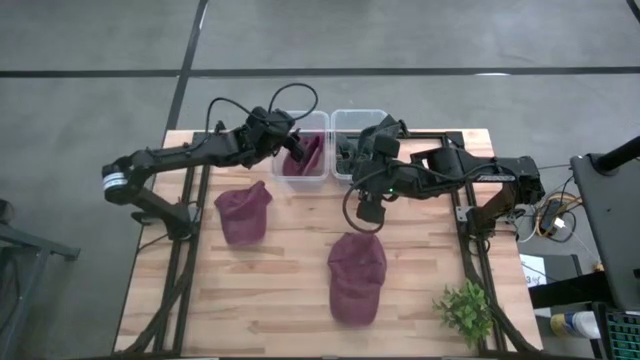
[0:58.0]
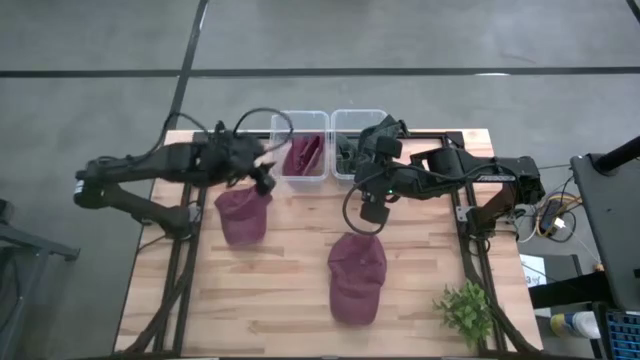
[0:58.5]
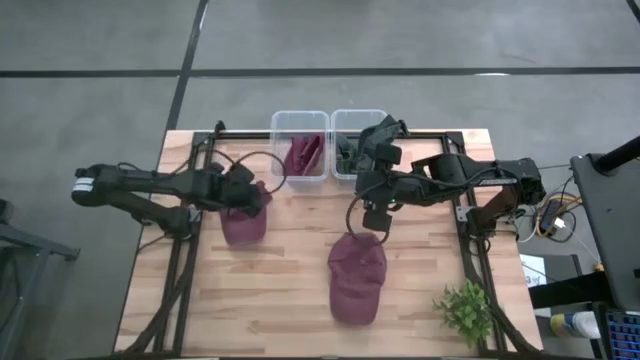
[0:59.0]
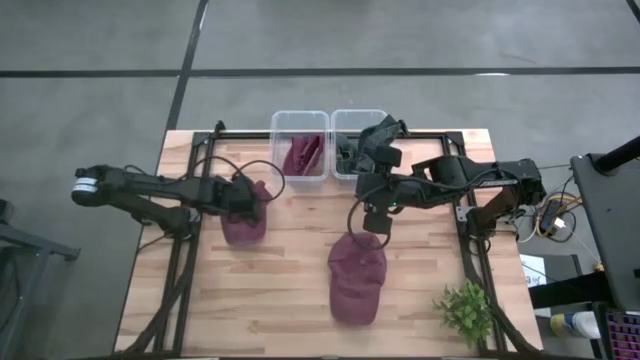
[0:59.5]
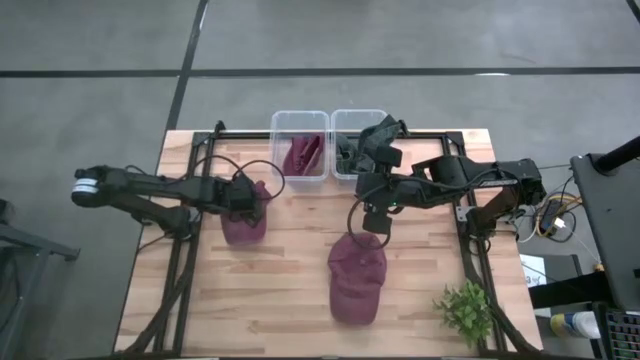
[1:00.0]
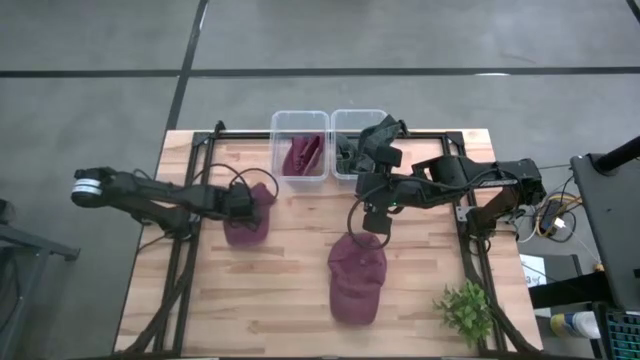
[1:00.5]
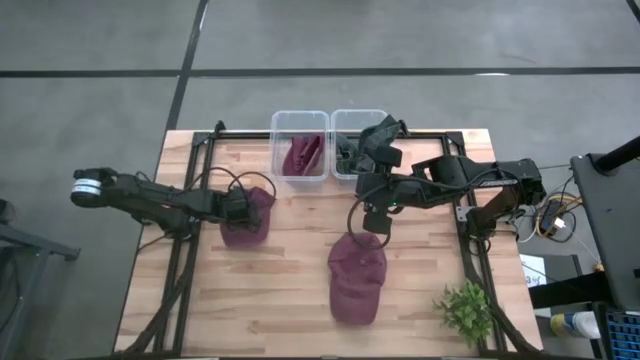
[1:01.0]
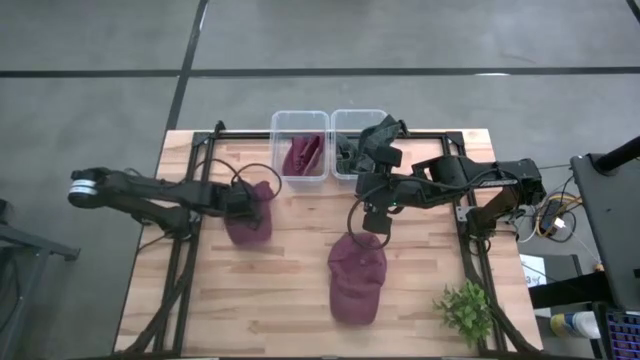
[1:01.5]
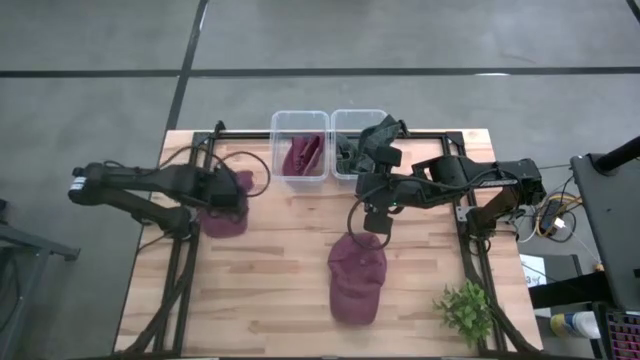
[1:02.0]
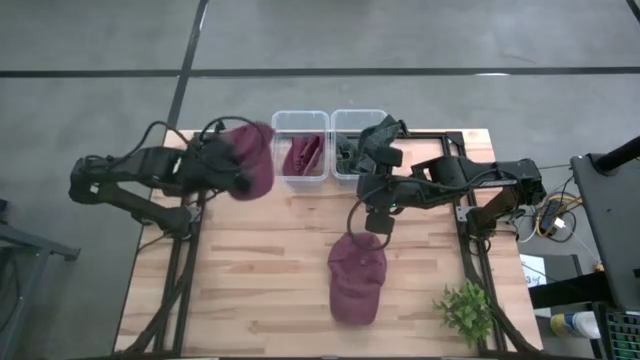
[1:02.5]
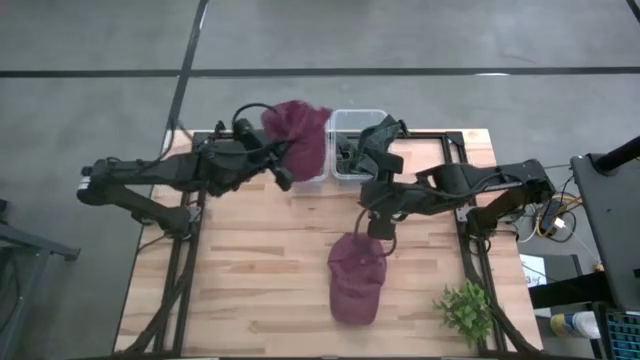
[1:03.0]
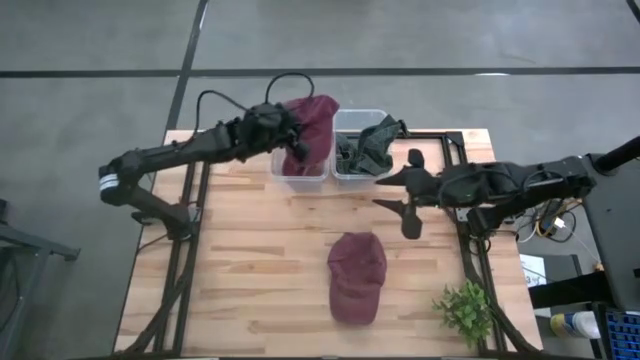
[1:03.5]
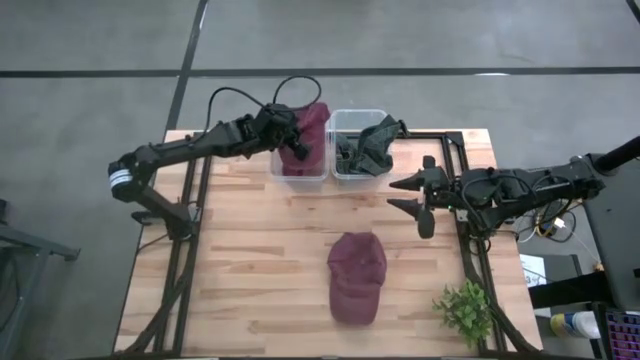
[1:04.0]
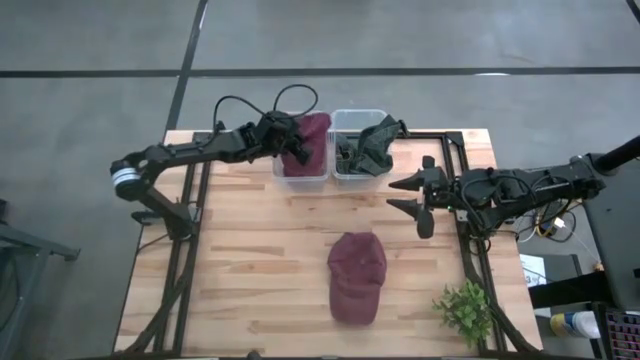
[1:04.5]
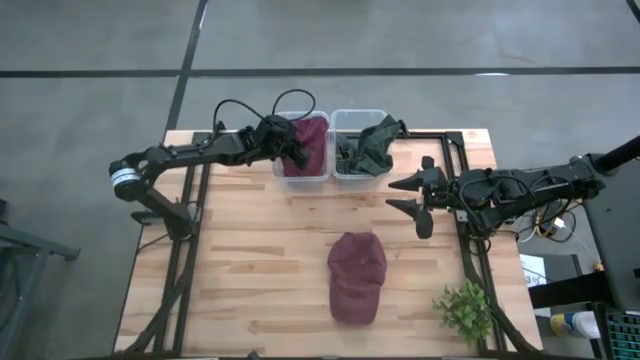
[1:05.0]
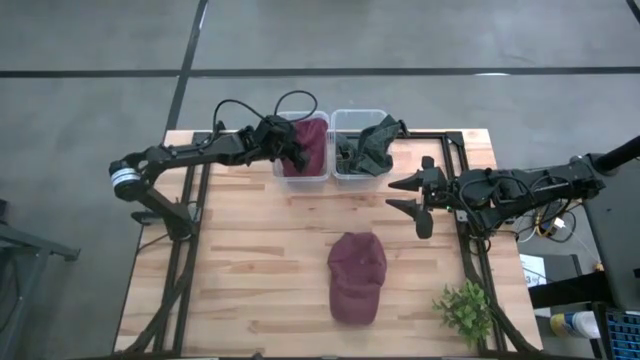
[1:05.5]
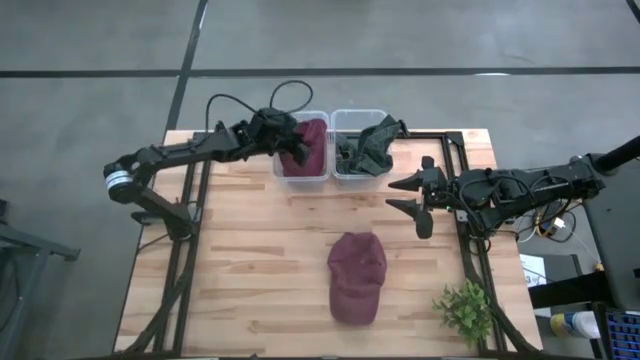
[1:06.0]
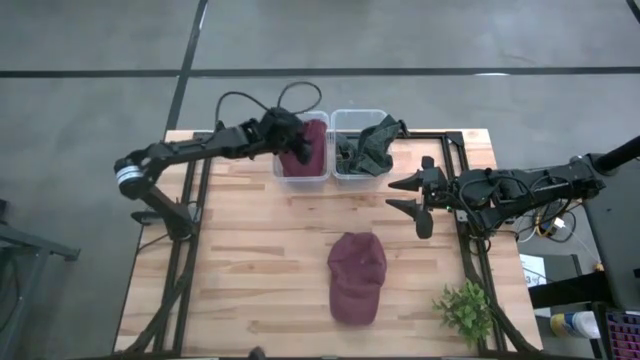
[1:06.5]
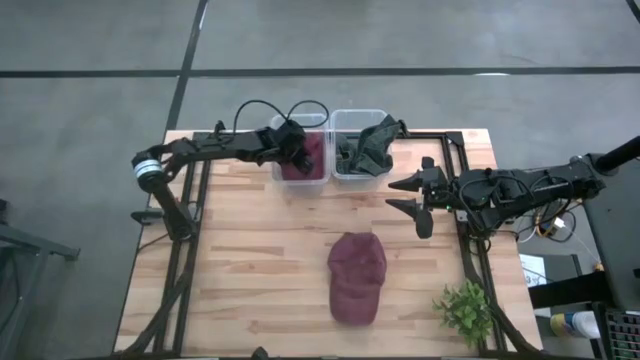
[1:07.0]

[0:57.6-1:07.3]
Task: Pick & Place hat
Put the top red cap into the left transparent bin

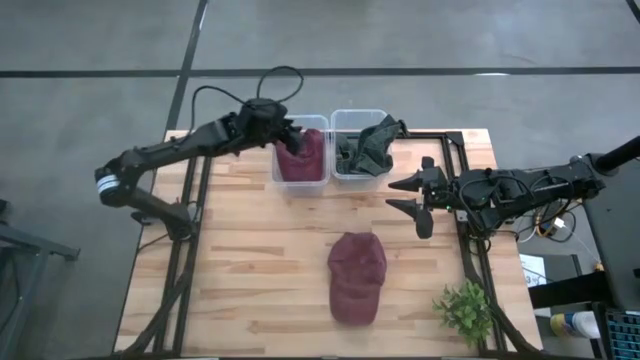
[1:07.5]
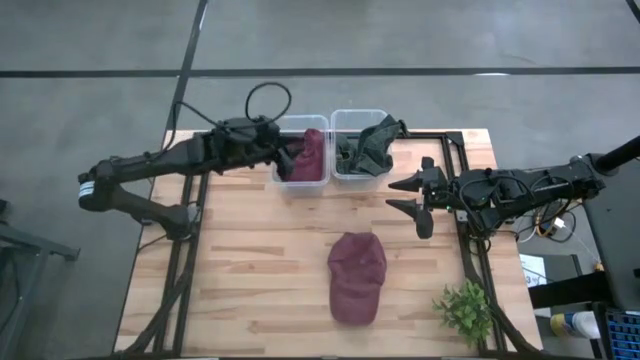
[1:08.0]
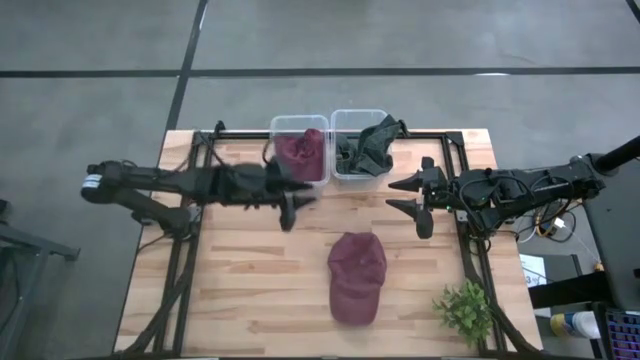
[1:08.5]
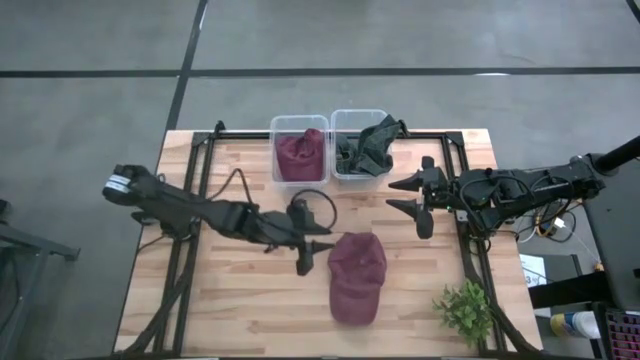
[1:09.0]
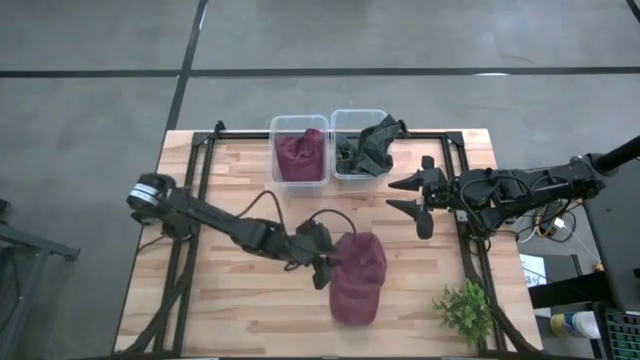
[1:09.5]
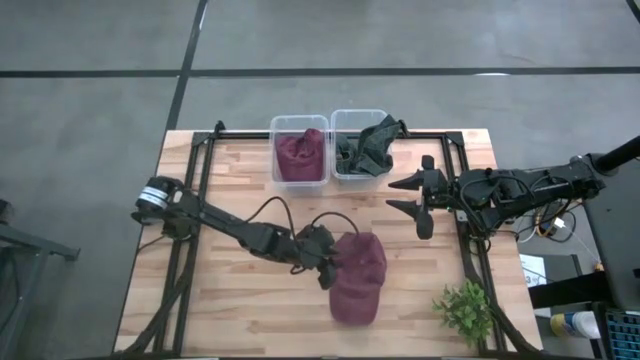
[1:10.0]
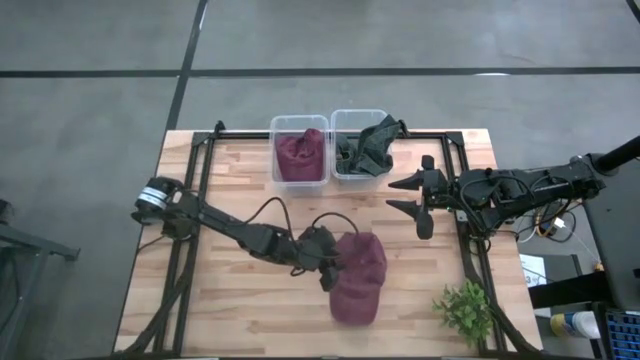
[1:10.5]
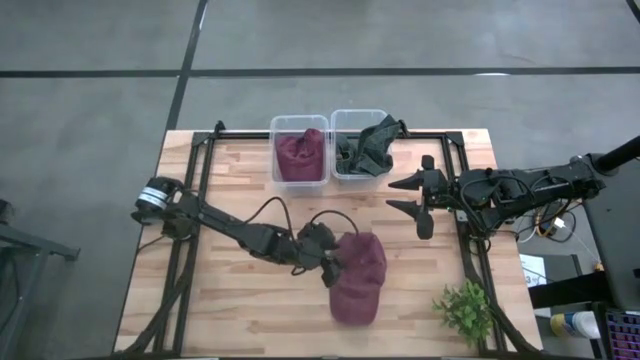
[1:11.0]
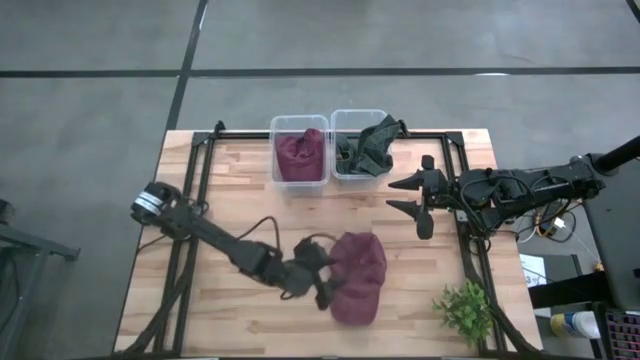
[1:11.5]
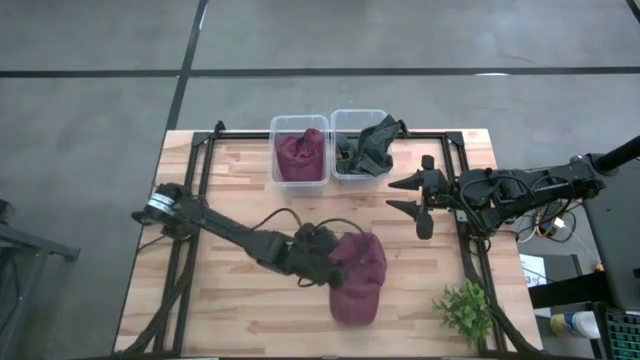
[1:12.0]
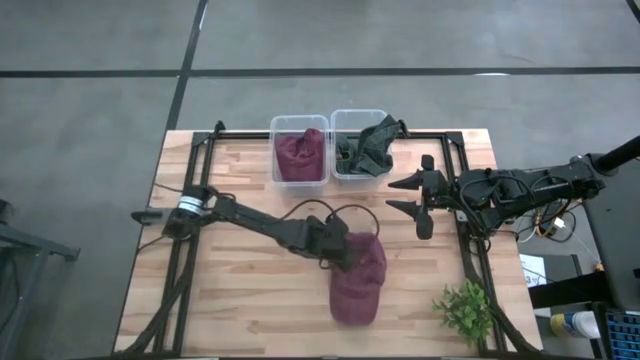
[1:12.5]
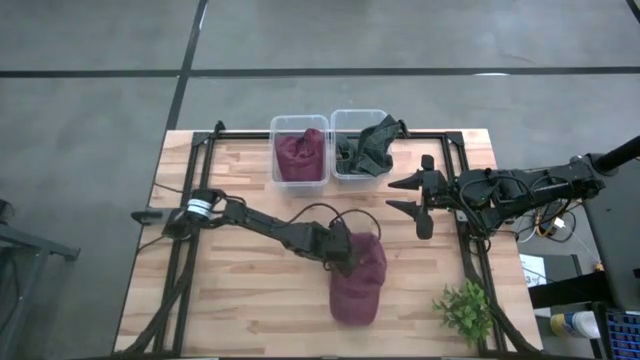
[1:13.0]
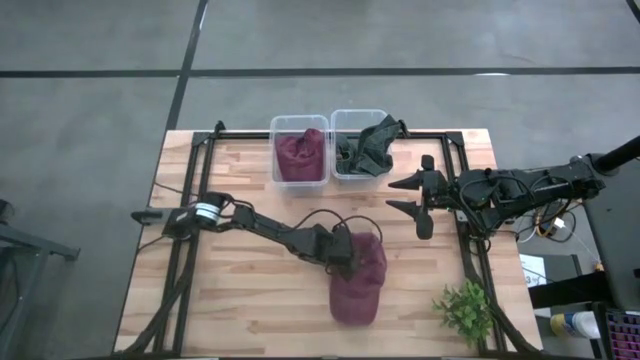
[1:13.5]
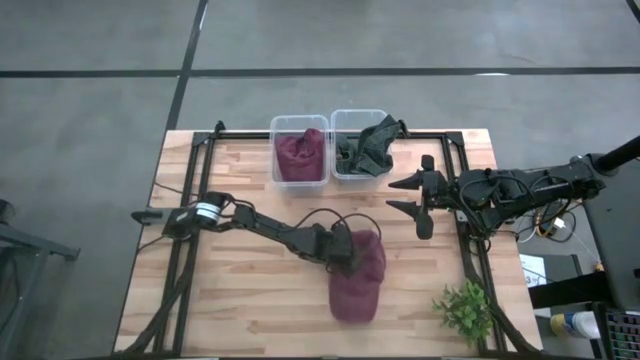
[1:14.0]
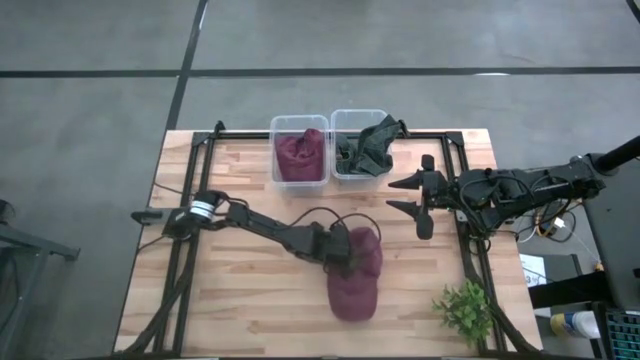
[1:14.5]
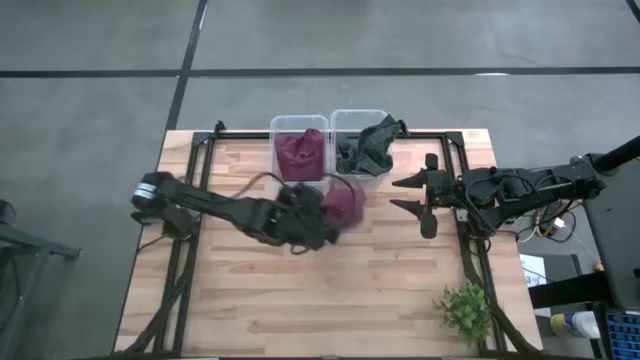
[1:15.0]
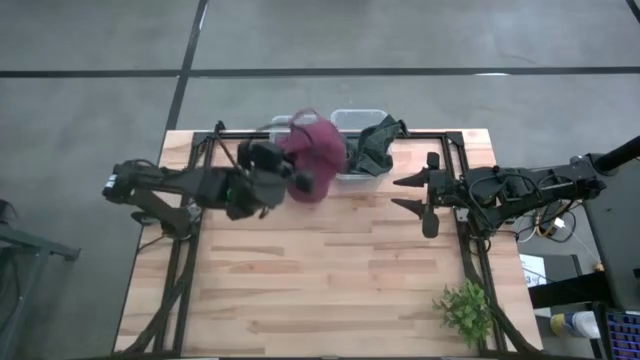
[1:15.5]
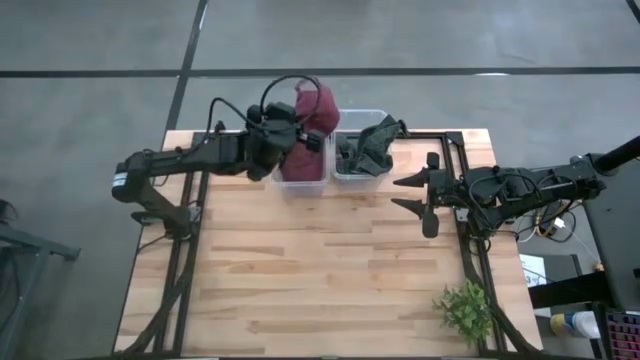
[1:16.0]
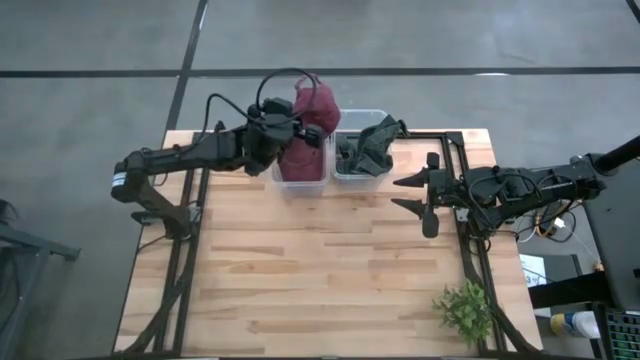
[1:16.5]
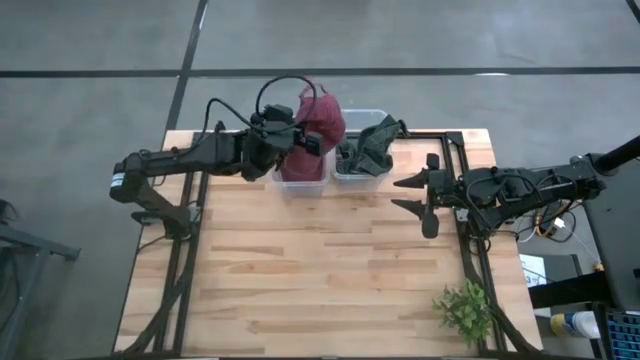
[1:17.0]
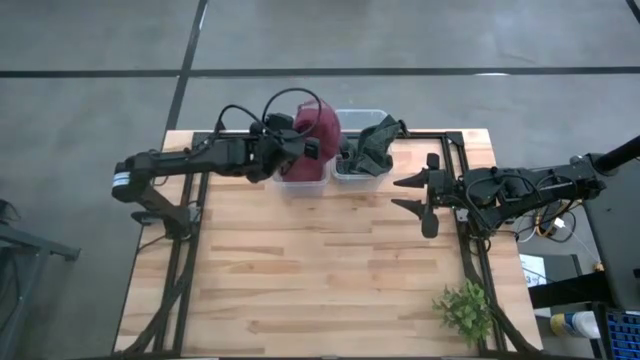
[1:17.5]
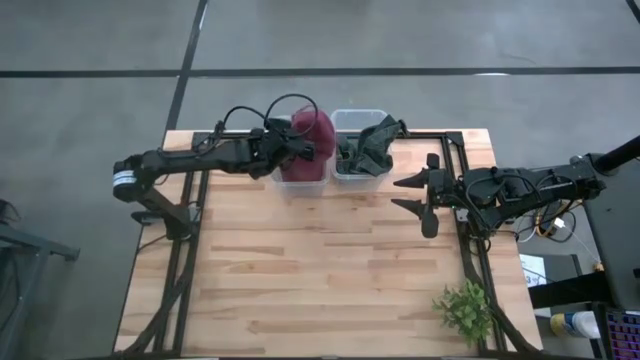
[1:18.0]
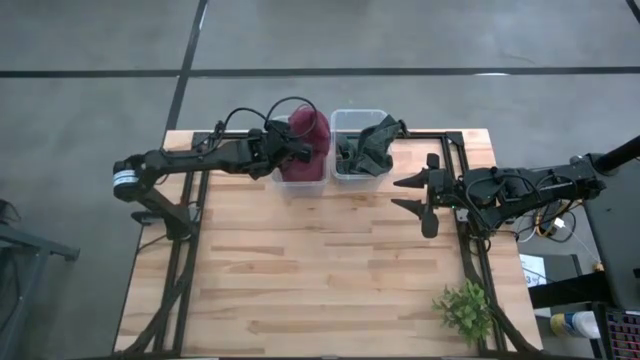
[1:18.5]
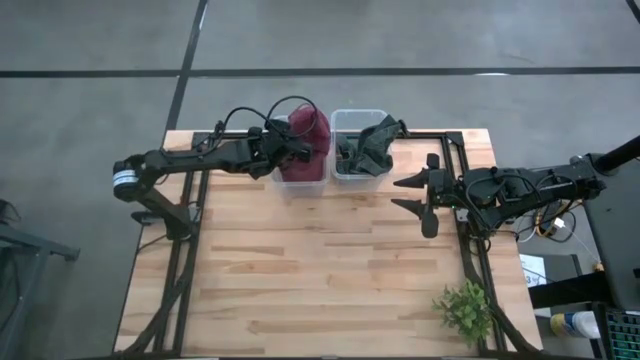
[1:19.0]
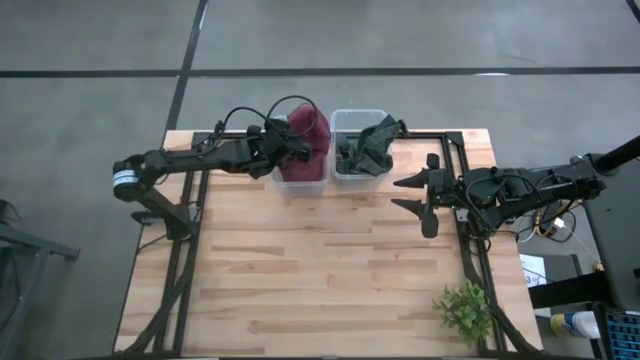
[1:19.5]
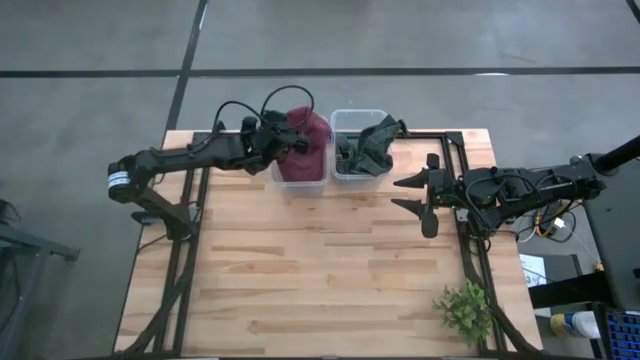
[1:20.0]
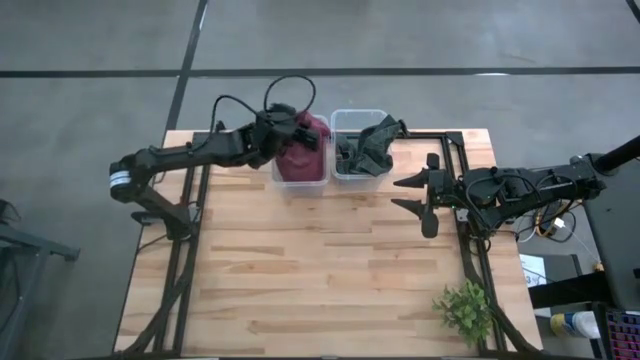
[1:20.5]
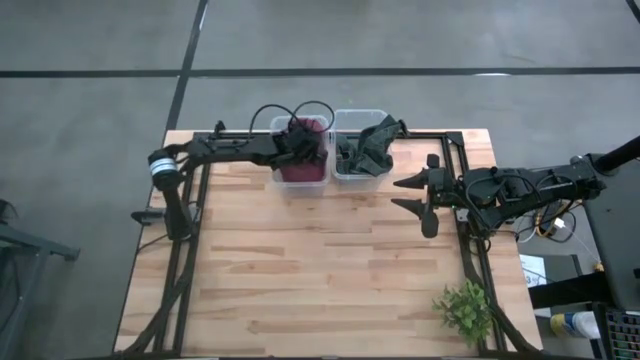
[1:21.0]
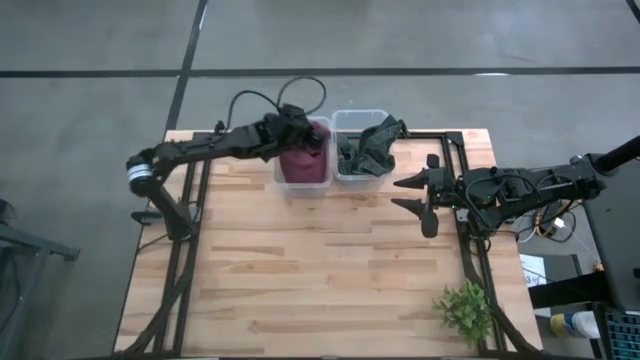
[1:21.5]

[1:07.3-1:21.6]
Put the red cap into the left transparent bin
